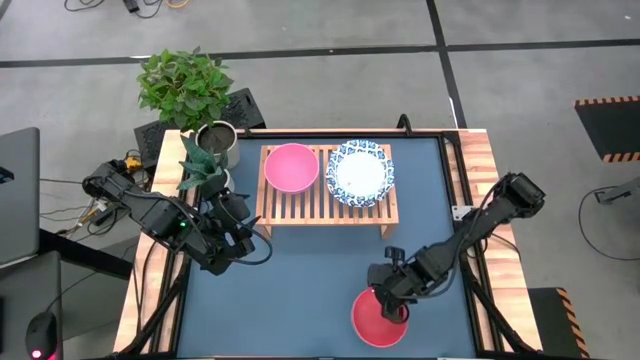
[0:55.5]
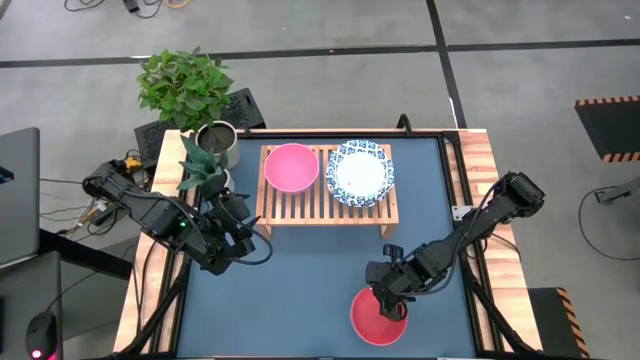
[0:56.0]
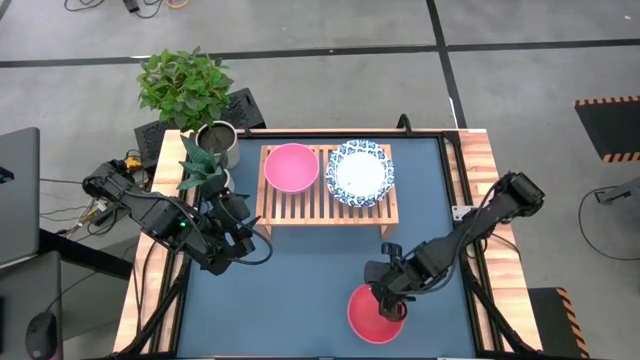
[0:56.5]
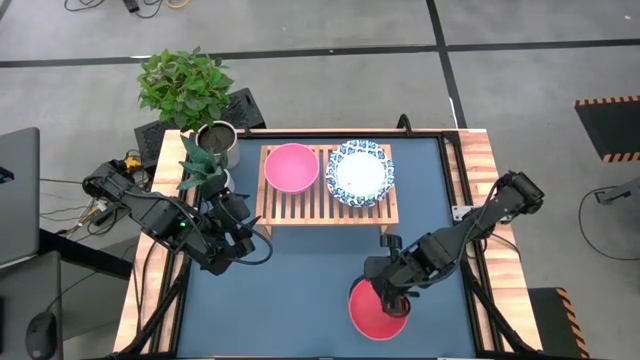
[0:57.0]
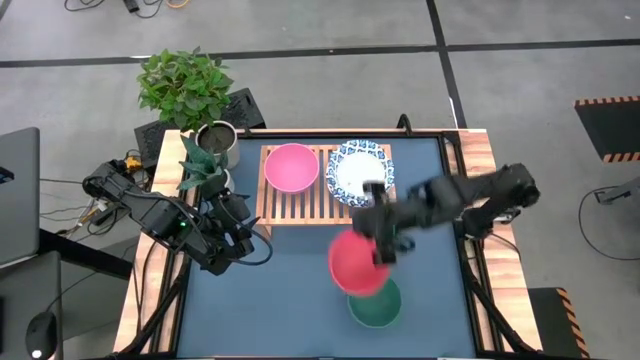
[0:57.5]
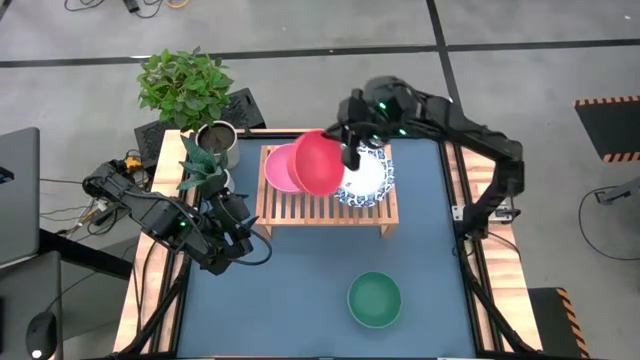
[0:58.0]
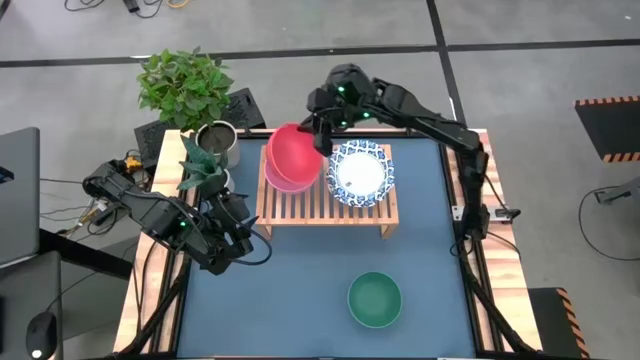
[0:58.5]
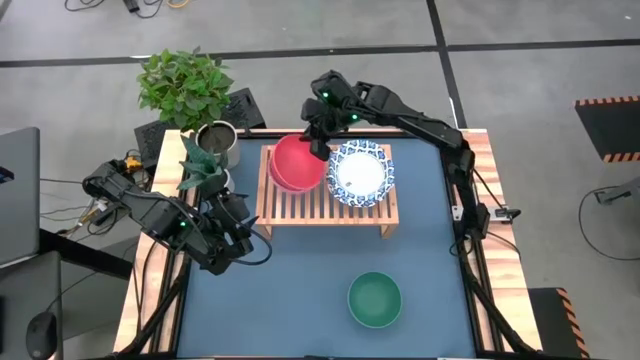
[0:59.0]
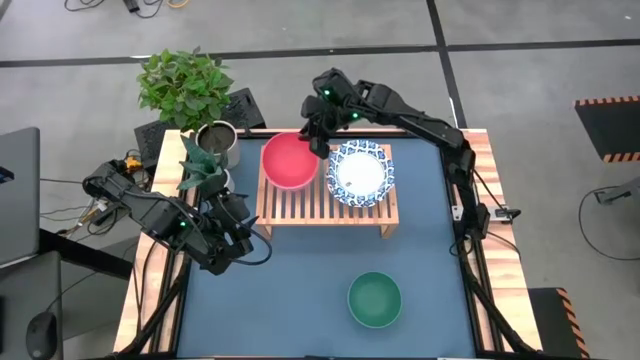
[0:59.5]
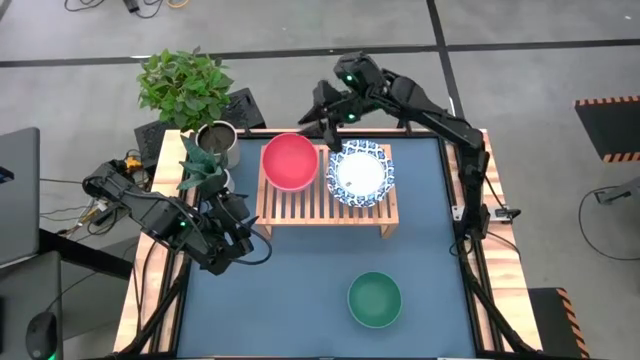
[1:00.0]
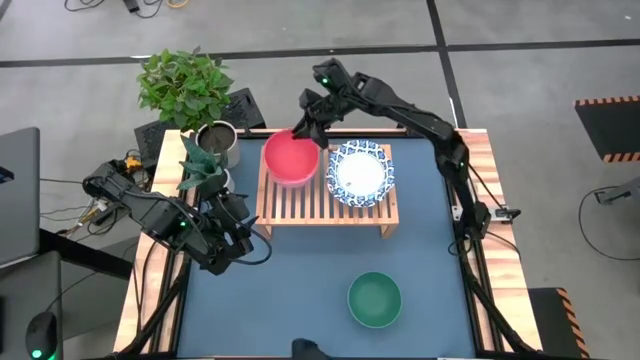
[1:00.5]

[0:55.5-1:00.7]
Task: Place and stack bowls onto a shelf
Stack the red bowl on top of the pink bowl on the shelf

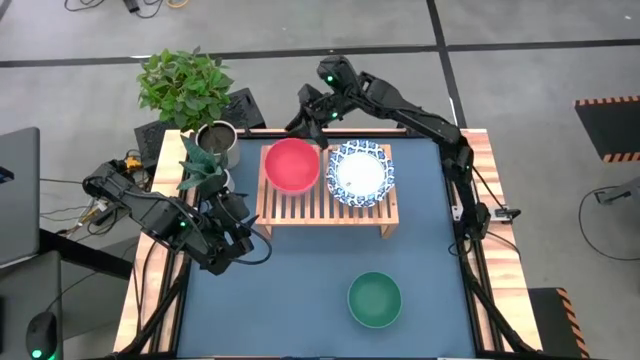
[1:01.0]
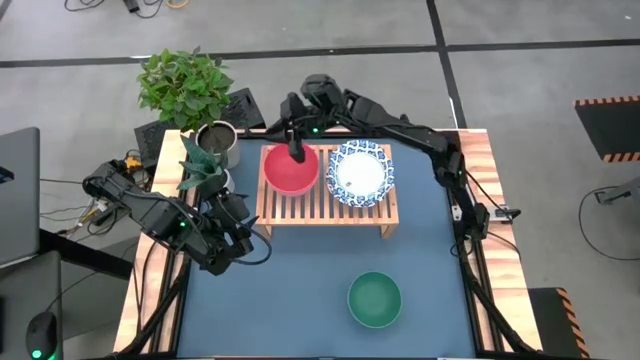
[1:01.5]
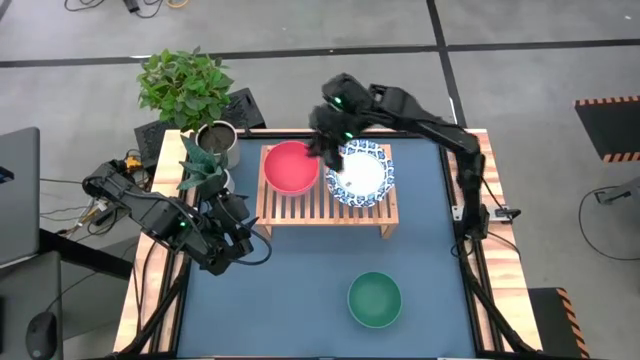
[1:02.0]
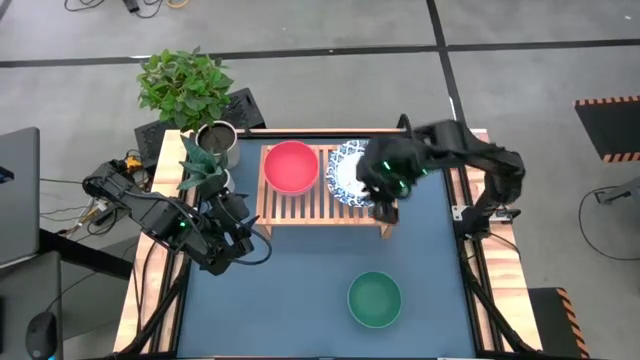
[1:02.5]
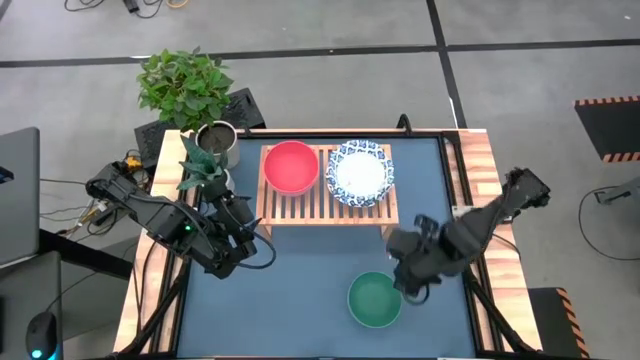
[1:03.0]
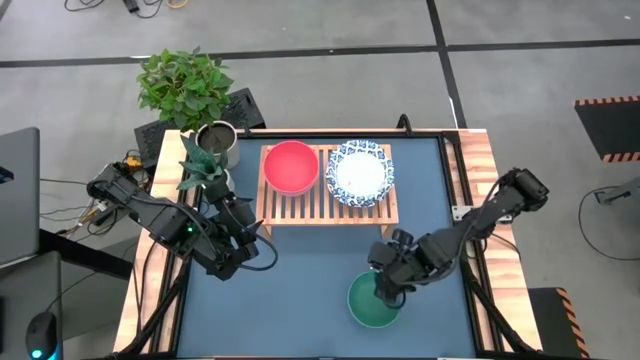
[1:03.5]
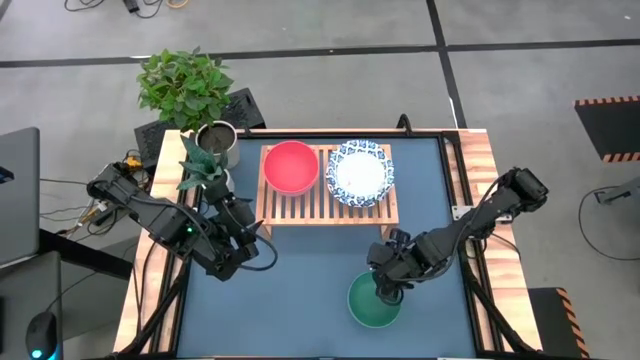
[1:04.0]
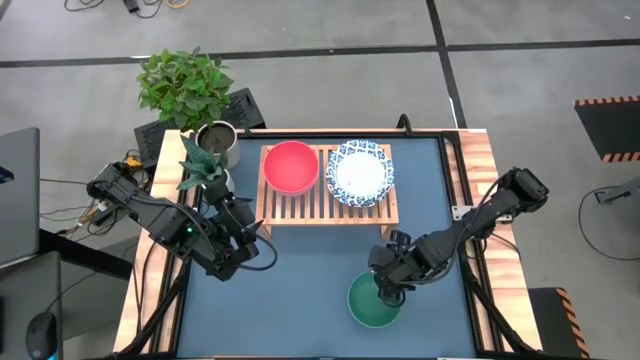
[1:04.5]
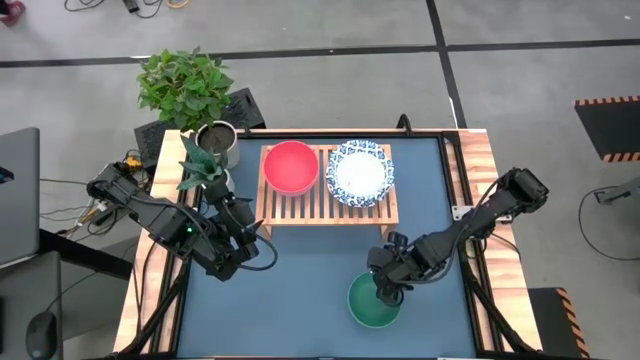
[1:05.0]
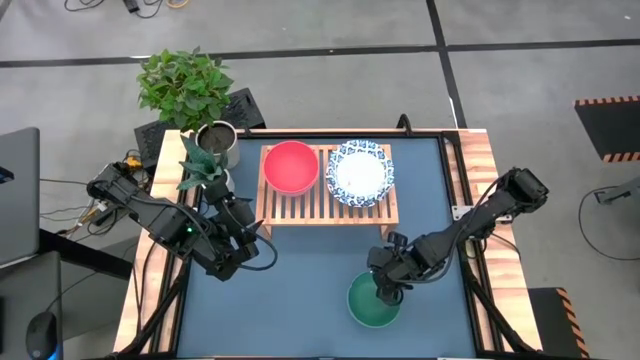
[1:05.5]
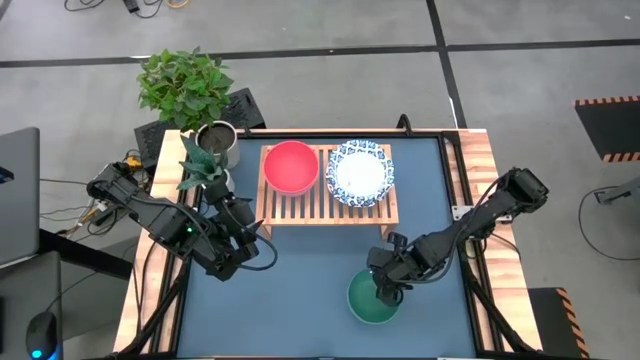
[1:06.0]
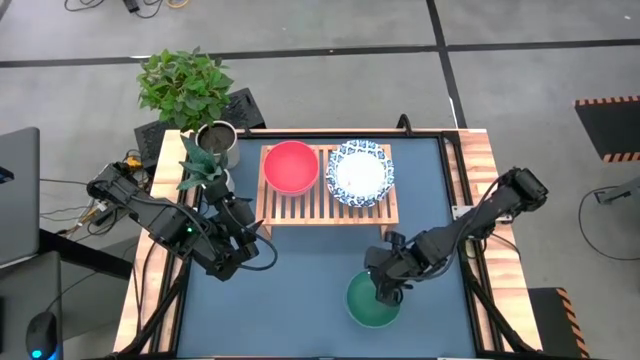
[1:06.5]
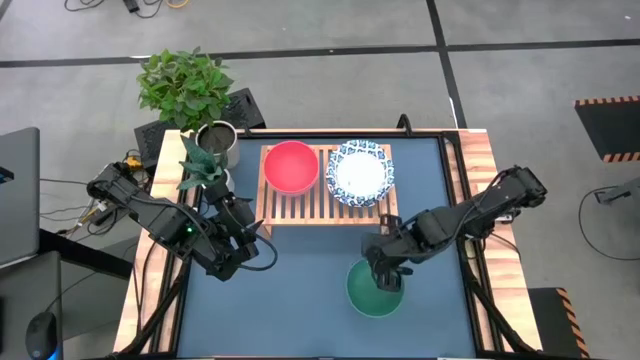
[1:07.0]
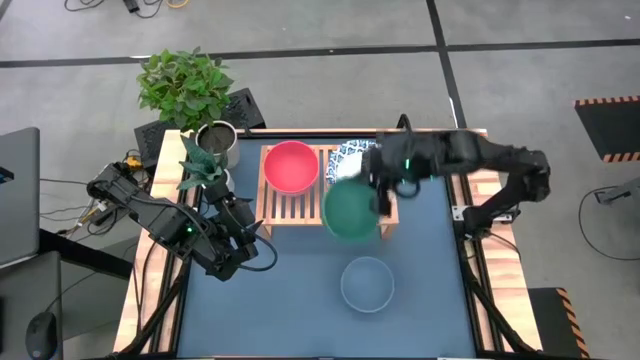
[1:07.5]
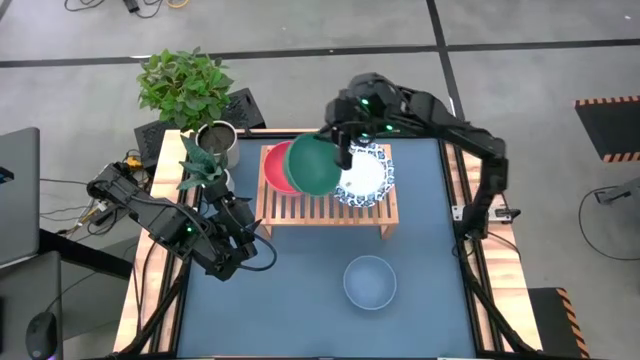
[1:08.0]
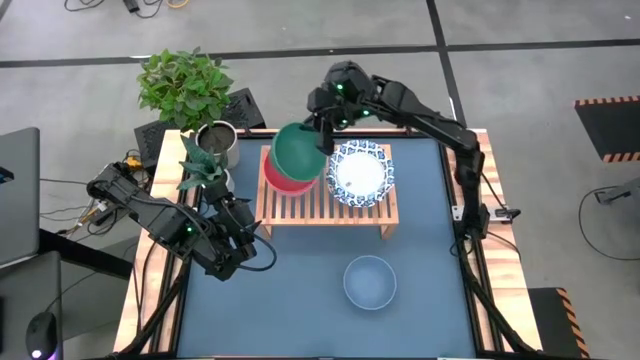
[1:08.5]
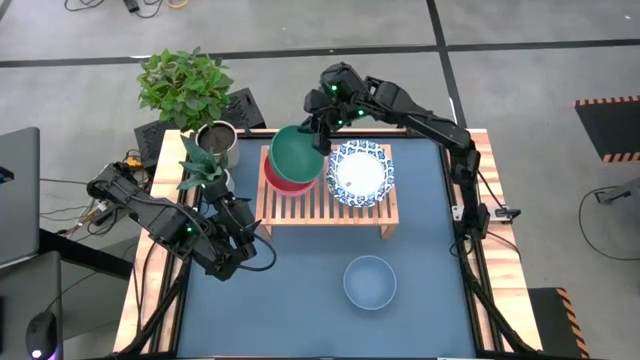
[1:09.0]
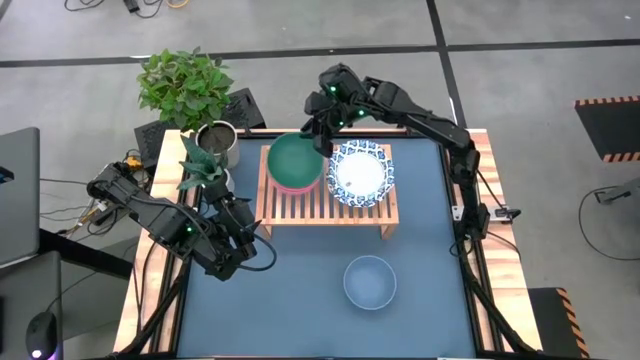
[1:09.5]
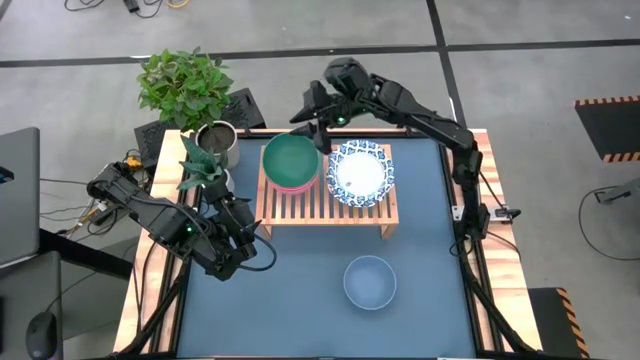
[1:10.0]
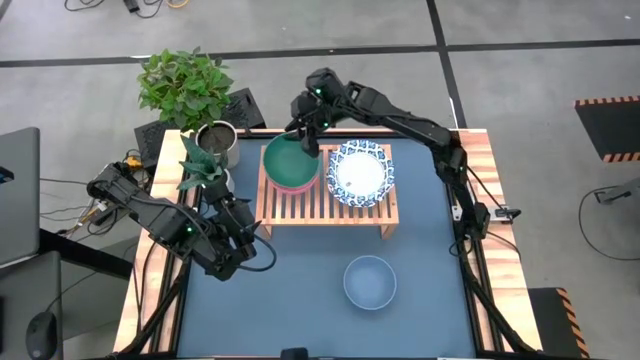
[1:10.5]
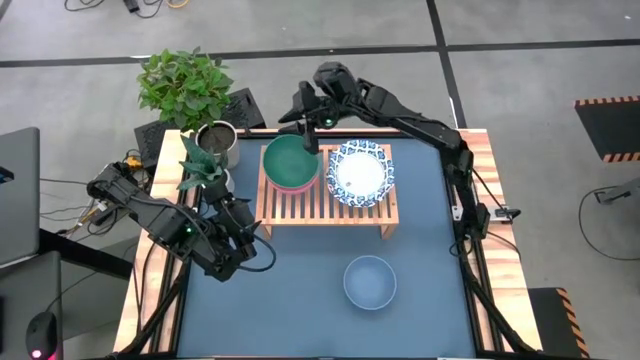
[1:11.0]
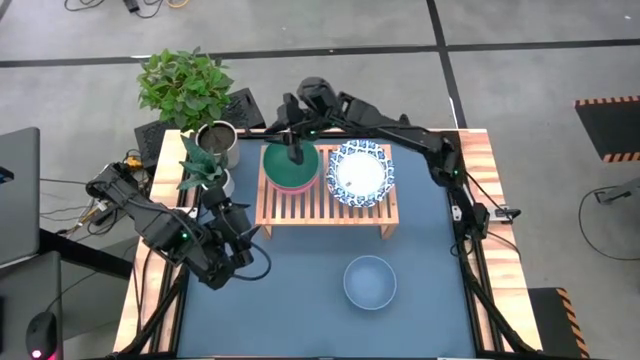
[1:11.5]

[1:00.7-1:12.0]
Stack the green bowl on top of the red bowl on the shelf

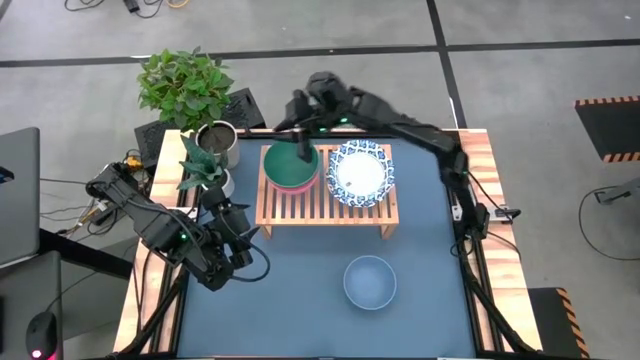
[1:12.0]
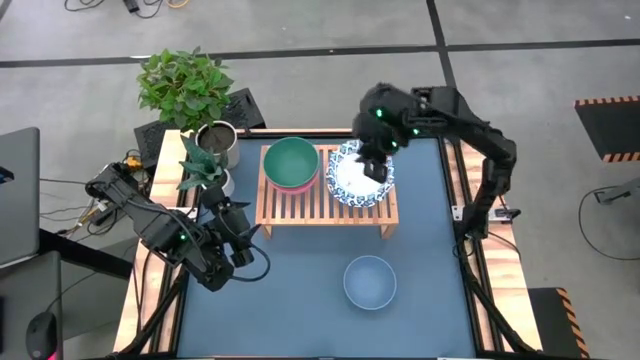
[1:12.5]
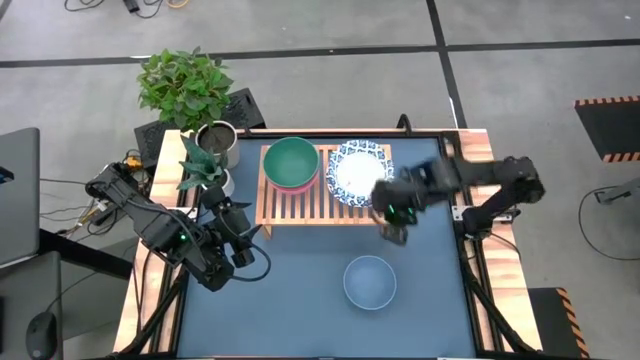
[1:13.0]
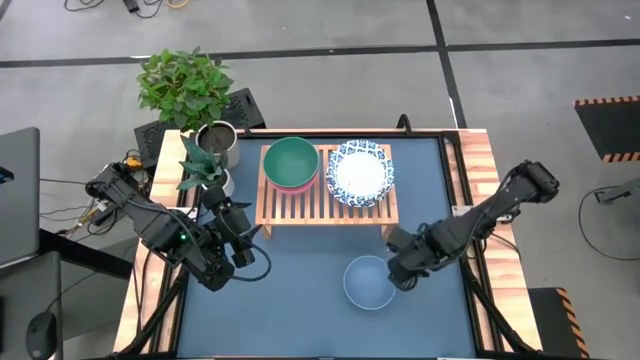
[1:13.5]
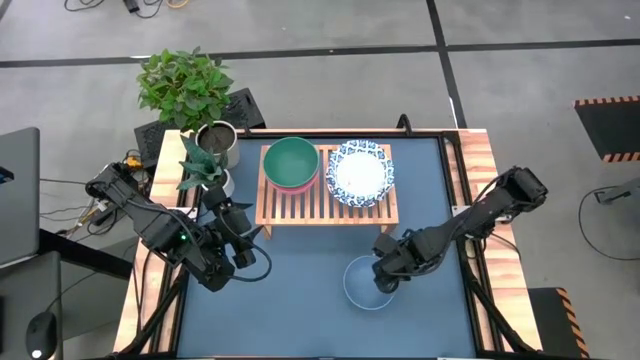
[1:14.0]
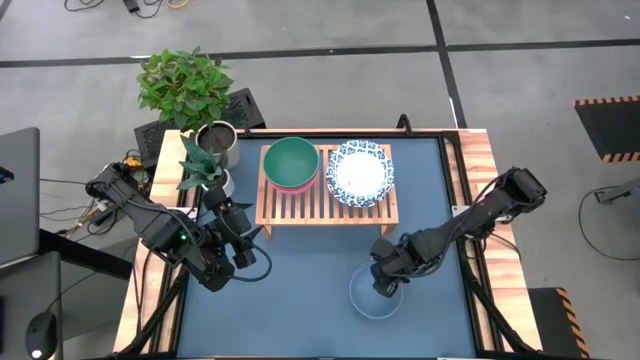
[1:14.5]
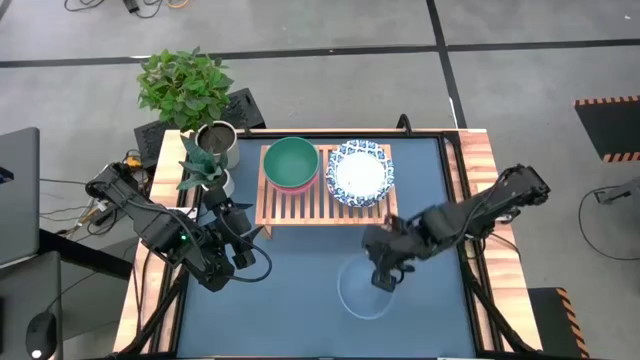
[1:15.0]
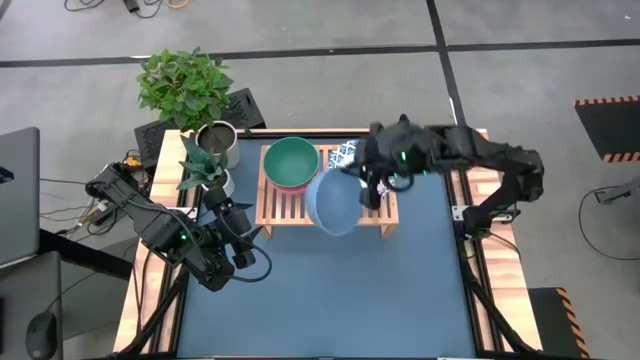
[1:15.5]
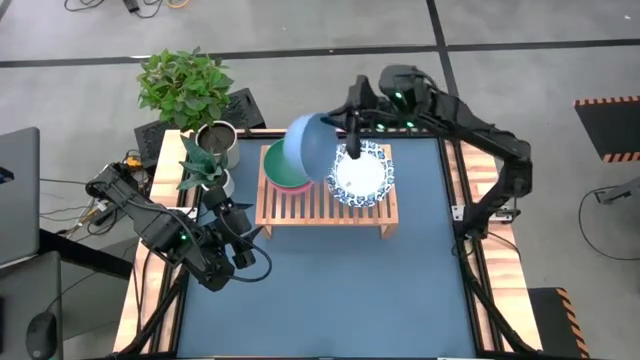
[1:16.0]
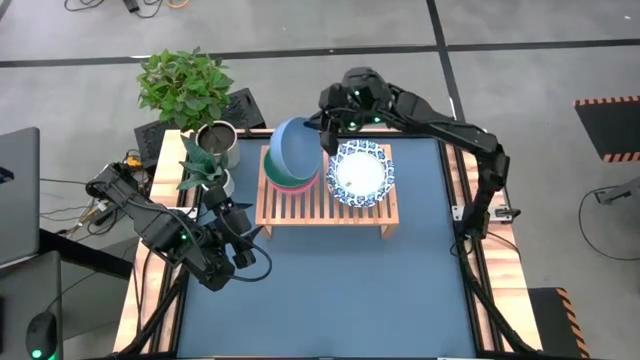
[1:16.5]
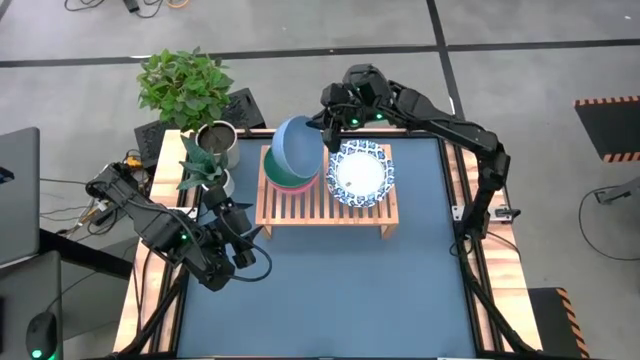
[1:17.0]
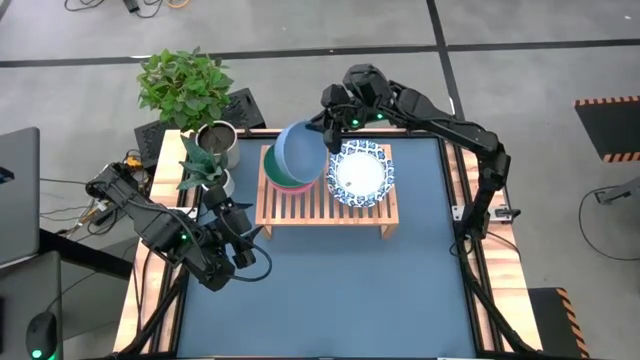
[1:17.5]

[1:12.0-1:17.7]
Stack the blue bowl on top of the green bowl on the shelf
